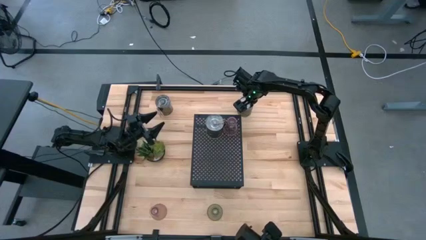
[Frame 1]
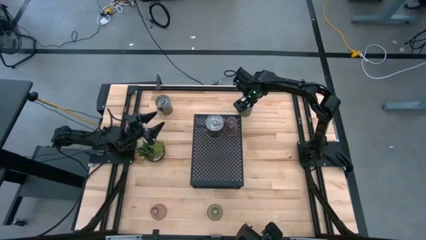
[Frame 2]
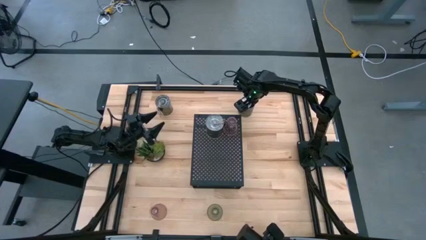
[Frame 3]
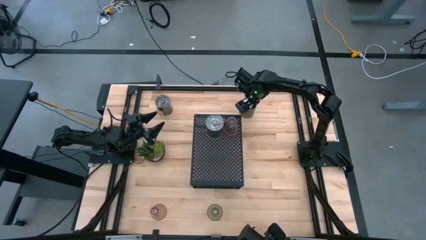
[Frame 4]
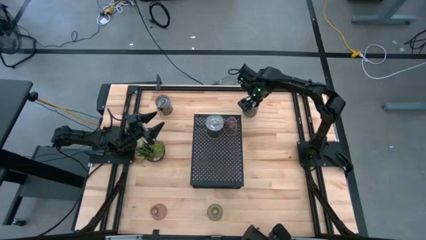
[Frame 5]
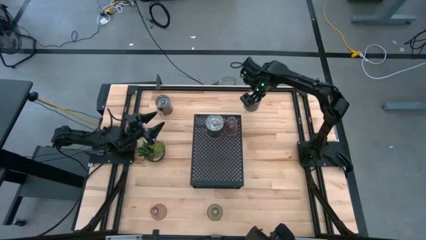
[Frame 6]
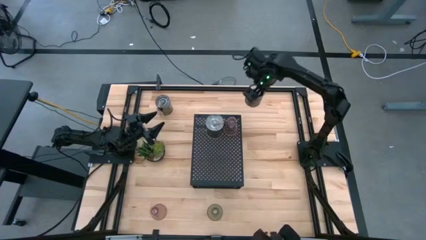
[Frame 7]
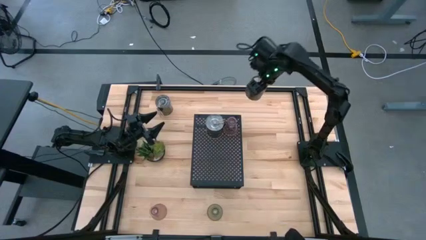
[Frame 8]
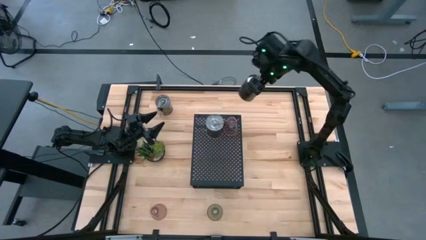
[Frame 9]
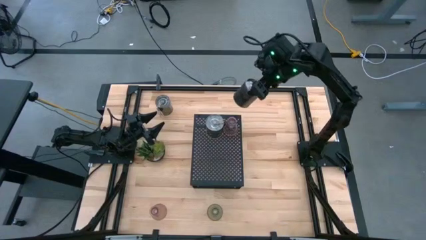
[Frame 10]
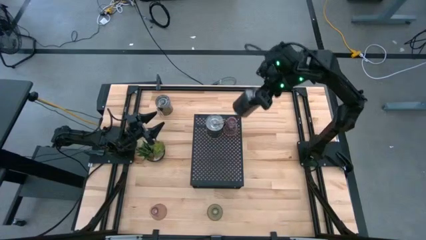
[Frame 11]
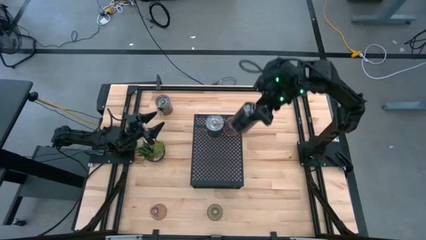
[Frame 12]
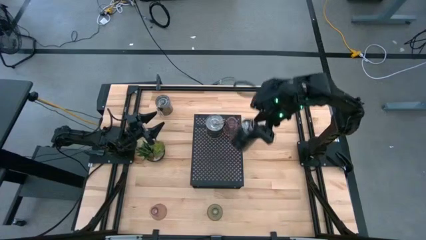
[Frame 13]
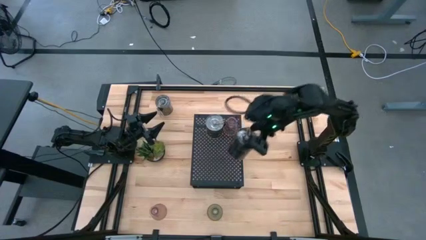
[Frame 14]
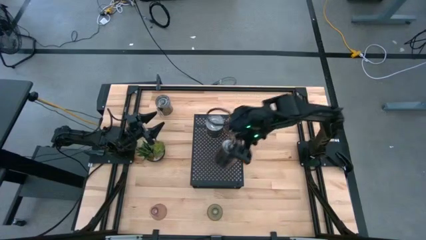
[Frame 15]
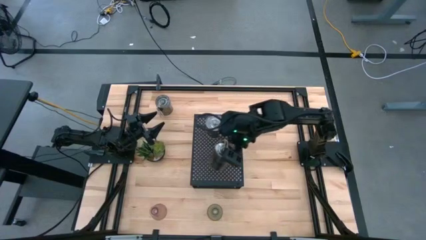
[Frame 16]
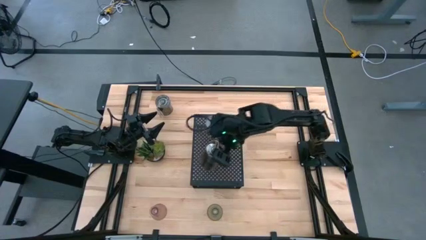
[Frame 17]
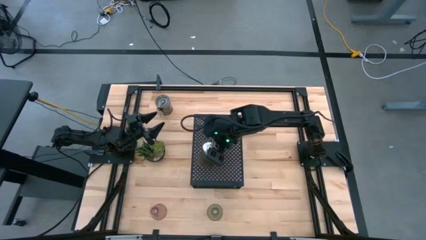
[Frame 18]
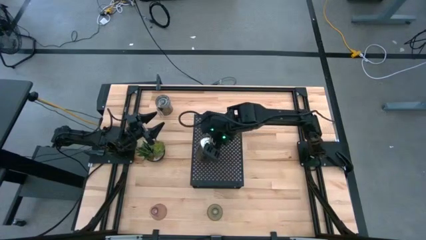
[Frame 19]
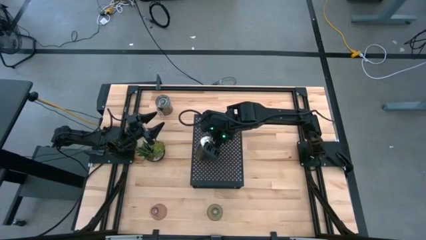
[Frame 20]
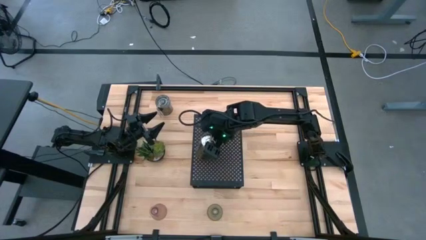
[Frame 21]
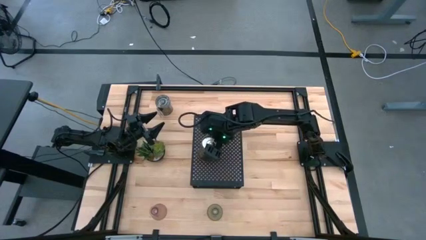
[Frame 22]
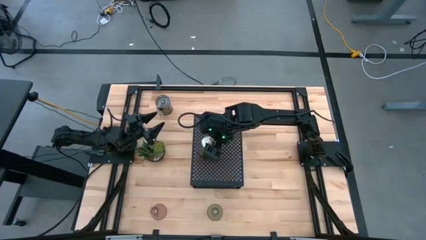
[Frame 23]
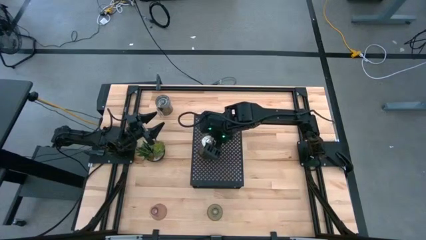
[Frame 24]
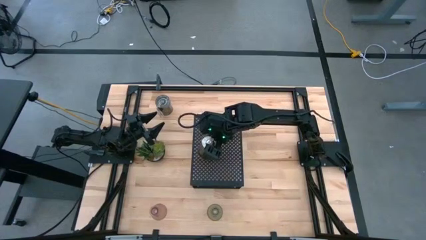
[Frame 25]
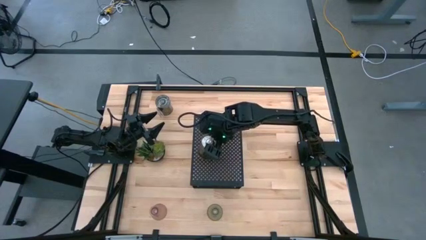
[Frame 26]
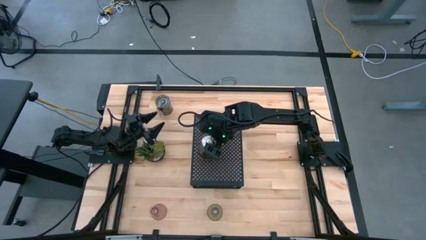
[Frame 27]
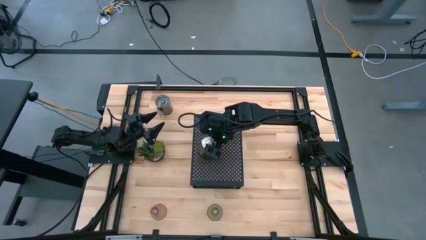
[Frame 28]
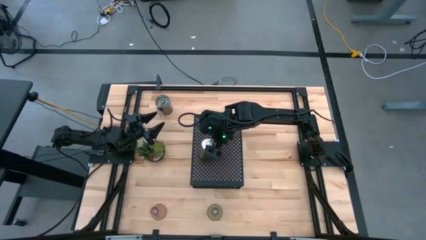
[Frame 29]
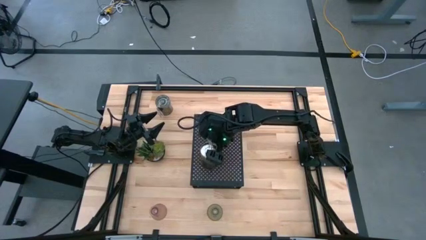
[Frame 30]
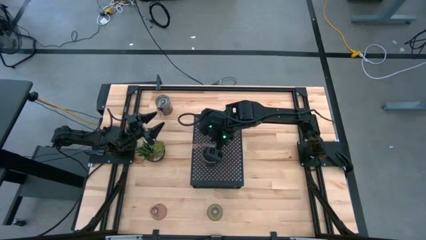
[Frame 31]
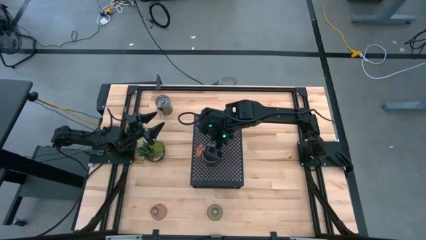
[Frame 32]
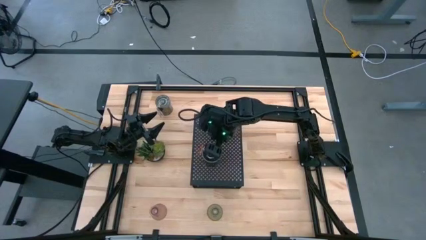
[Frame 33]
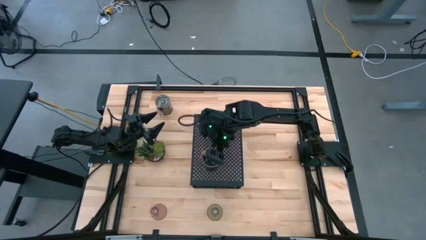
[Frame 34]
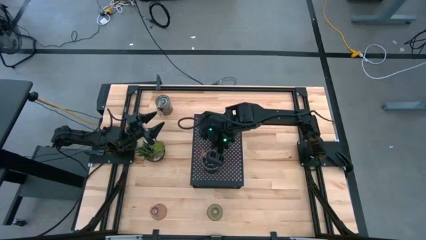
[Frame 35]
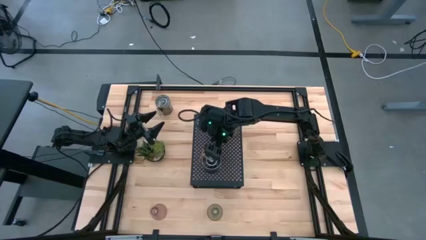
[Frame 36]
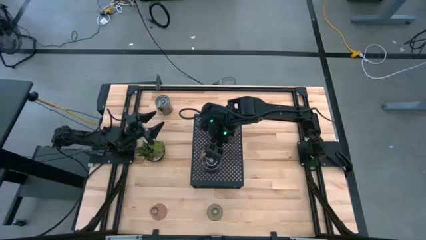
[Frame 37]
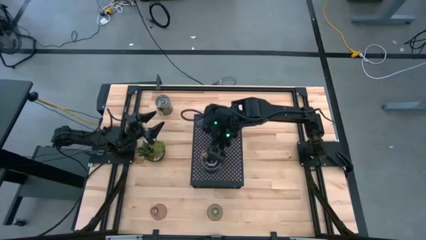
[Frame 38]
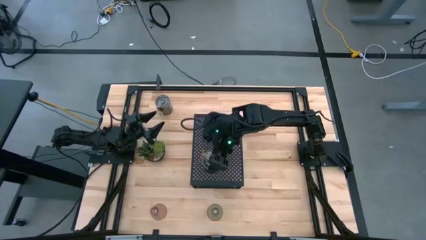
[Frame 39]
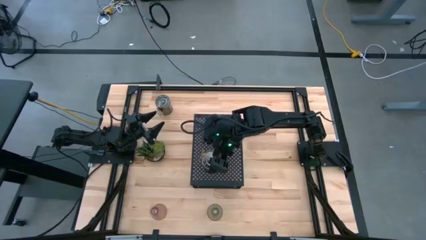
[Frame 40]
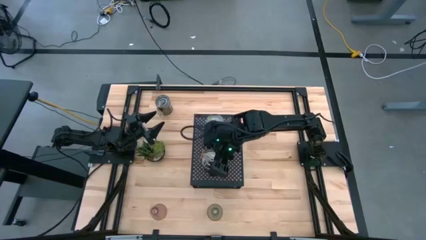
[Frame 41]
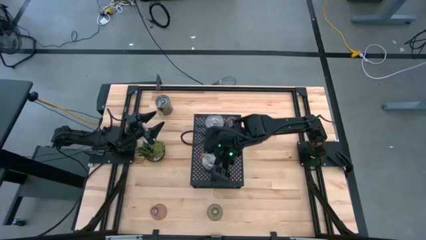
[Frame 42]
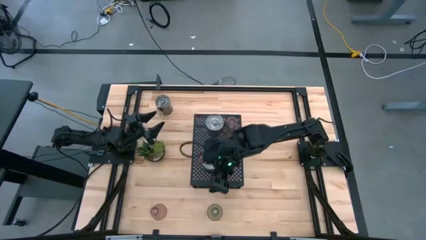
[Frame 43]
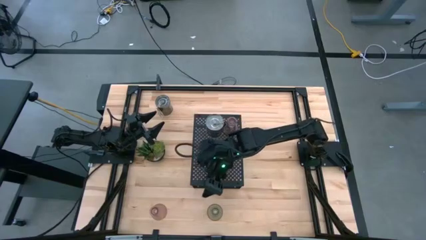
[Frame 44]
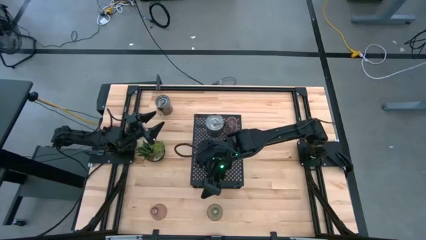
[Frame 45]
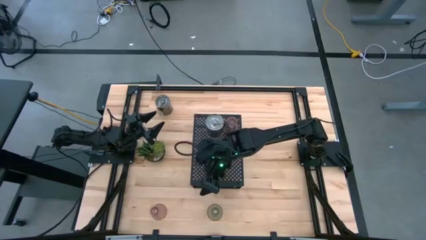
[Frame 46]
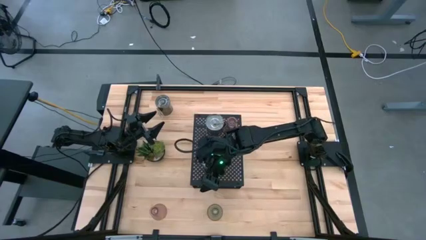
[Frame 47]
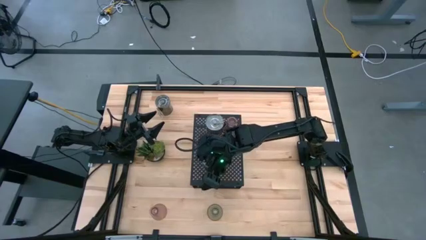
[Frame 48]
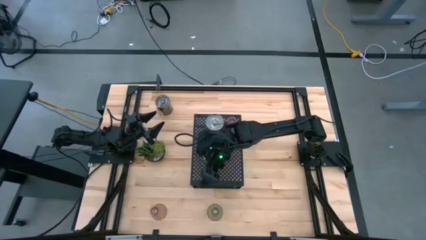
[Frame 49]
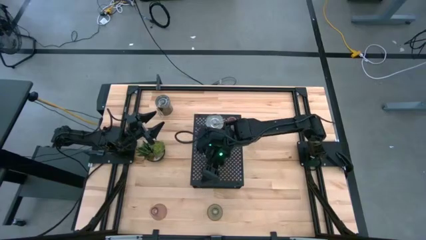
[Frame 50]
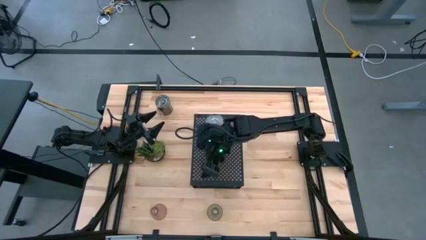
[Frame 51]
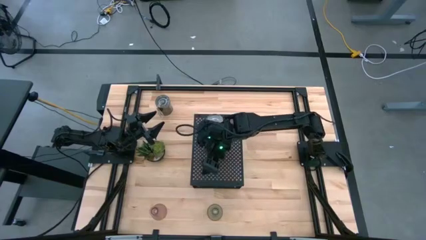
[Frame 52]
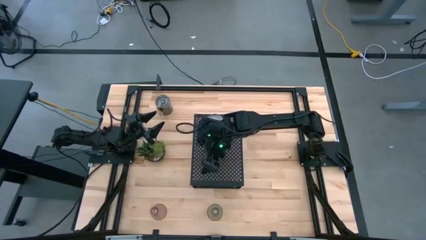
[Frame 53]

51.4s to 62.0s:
Task: Pick & Place candle stick holders
Put the right silver scented candle on the shelf aligned with the silver scented candle

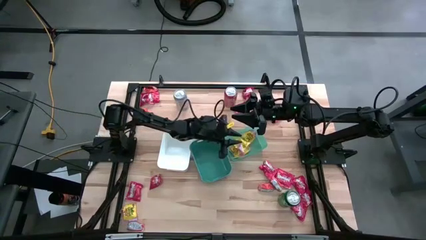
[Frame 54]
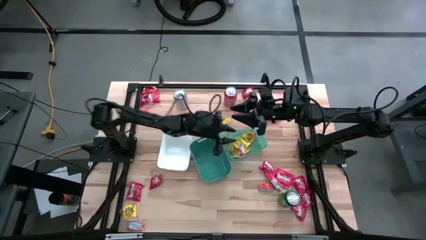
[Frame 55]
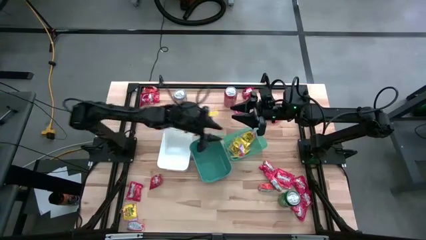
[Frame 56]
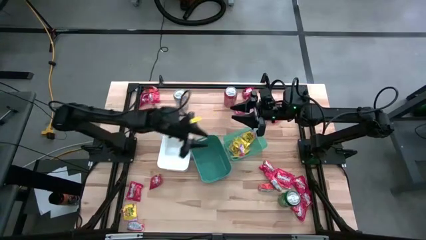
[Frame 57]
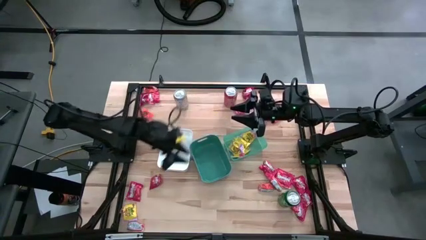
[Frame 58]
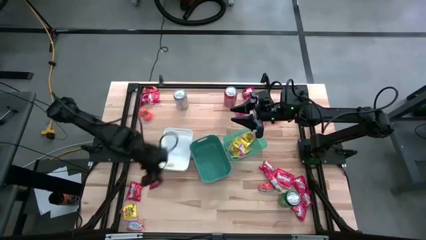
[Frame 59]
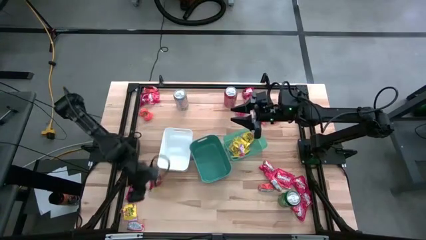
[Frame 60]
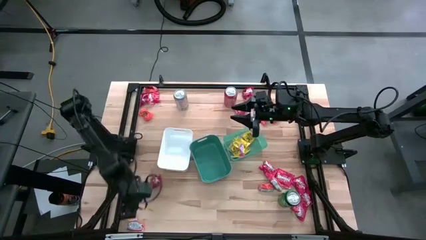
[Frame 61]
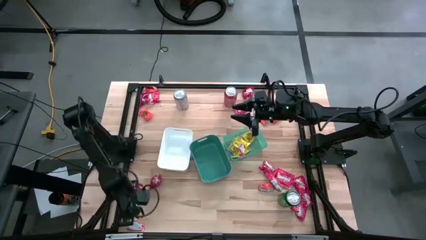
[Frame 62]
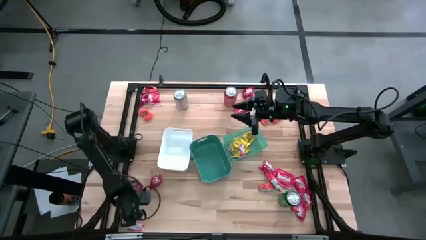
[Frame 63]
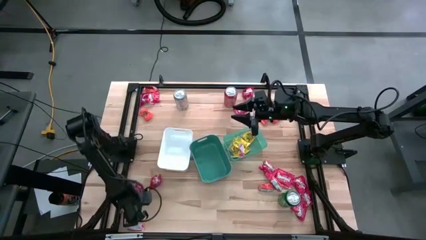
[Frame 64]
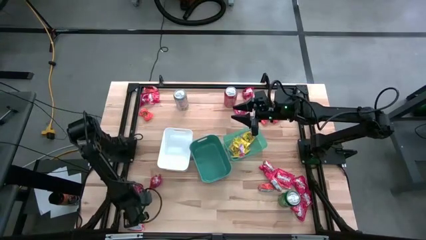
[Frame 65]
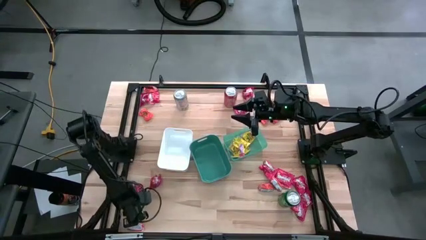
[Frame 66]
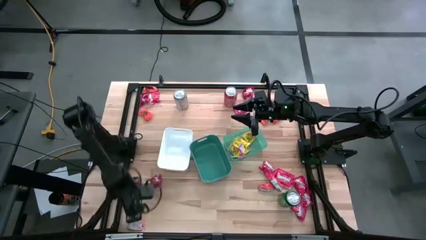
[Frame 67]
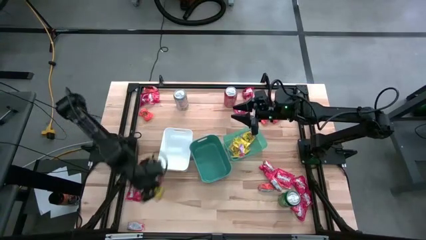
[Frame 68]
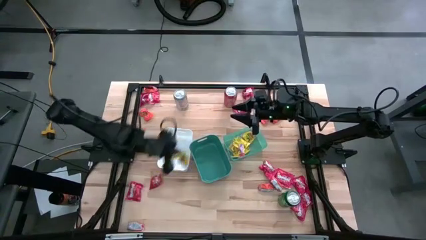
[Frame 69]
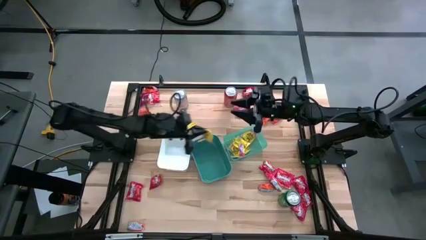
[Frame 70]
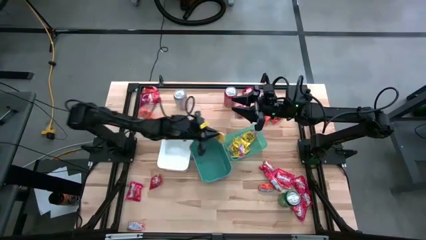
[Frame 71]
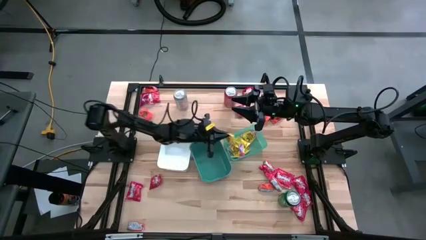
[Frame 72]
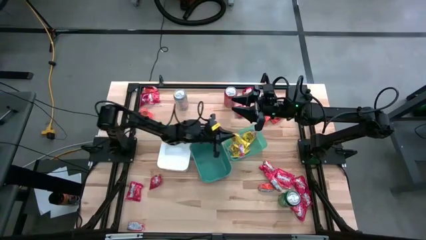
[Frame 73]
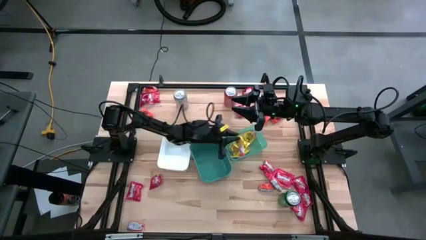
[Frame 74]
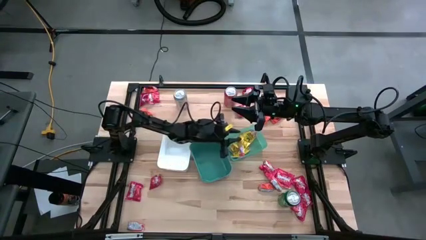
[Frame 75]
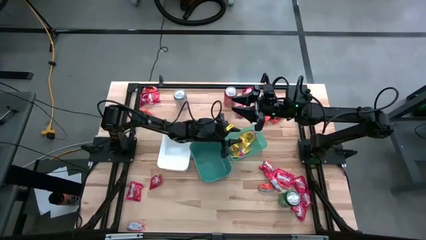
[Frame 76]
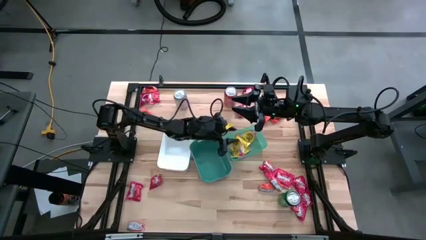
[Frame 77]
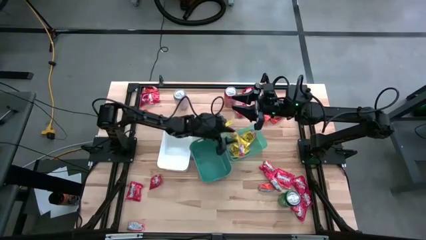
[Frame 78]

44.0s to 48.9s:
Task: Sort candy
Put the yellow candy into the green transparent bin

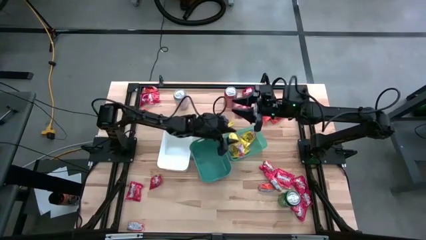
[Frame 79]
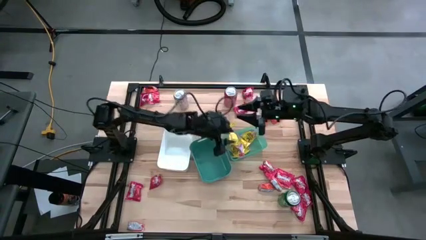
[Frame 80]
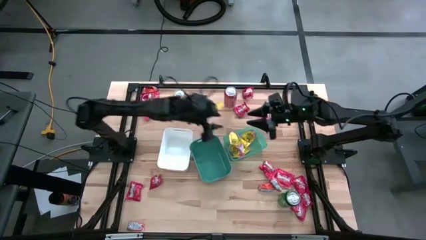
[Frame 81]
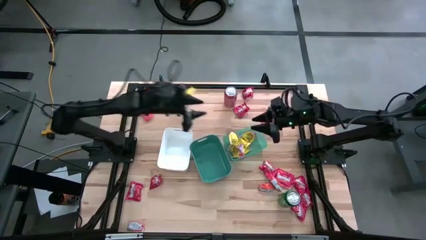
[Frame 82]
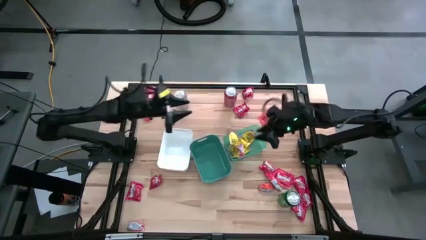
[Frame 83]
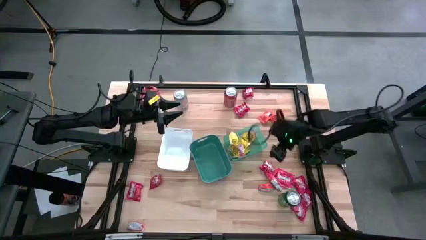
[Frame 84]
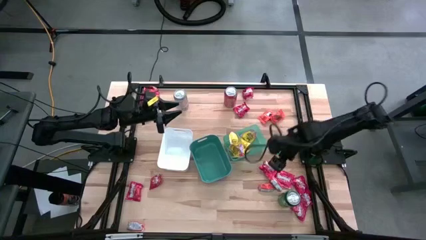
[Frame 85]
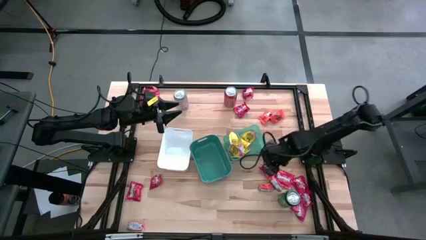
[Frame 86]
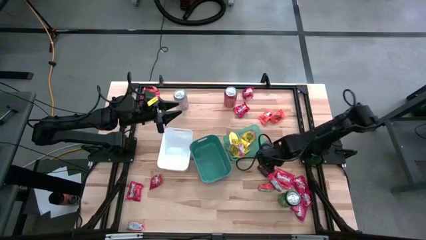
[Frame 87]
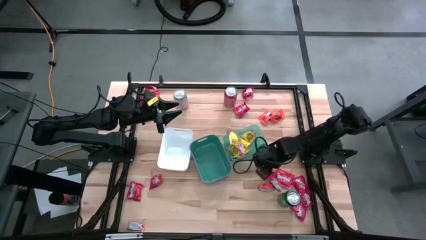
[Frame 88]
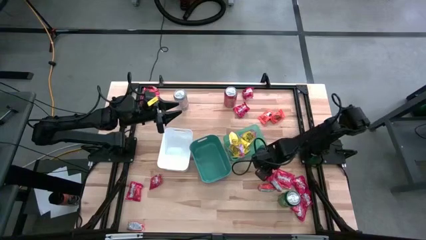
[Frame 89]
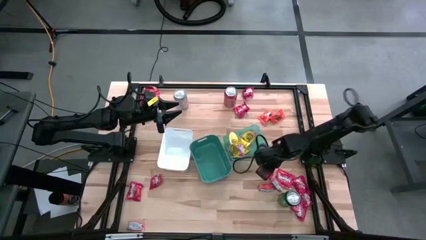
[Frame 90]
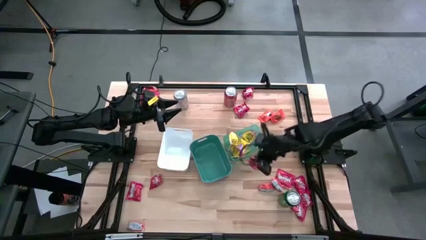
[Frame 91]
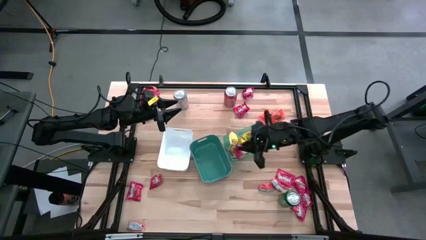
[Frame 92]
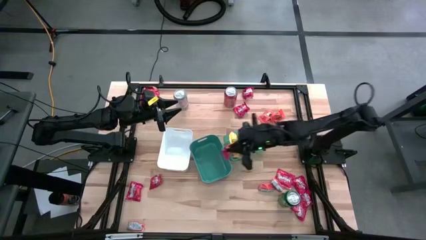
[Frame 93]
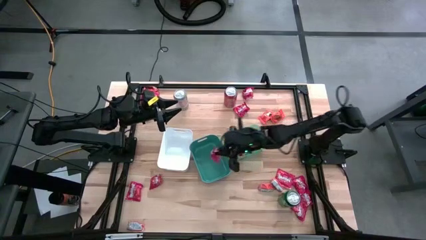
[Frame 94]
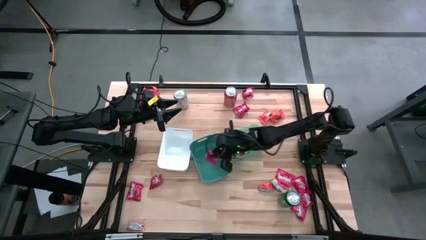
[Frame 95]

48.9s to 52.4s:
Put the red candy into the green bin
